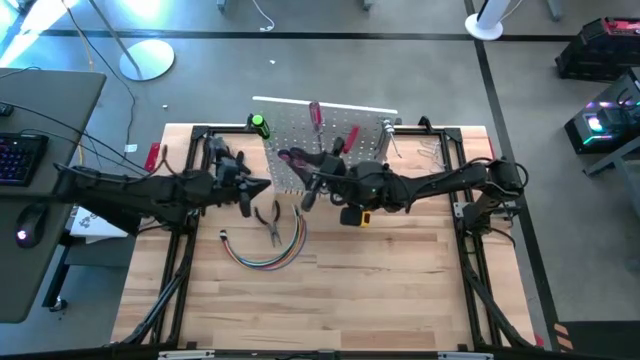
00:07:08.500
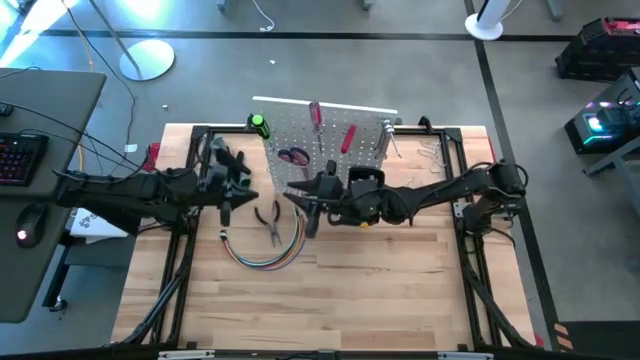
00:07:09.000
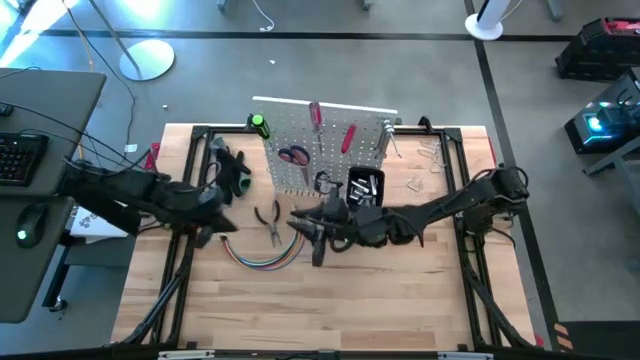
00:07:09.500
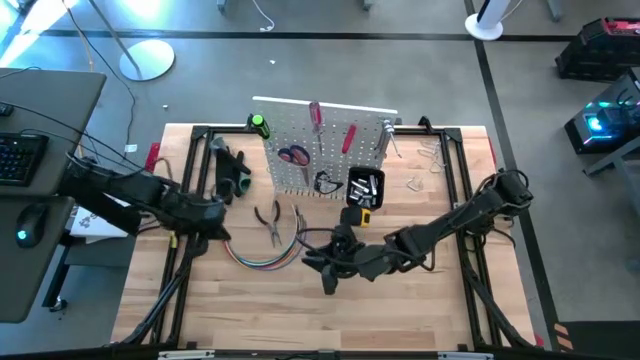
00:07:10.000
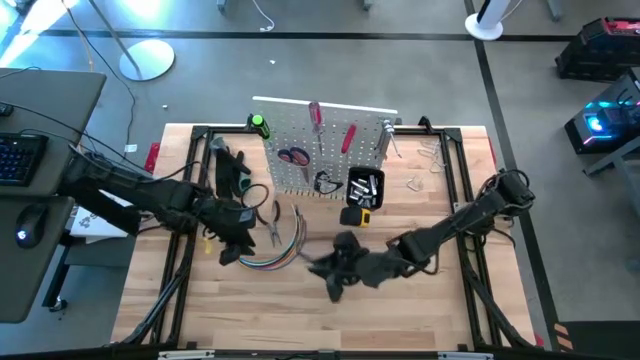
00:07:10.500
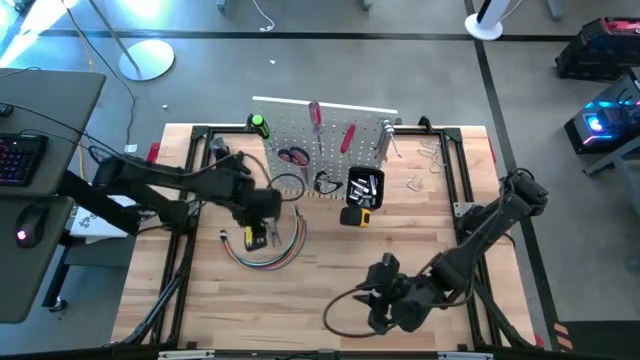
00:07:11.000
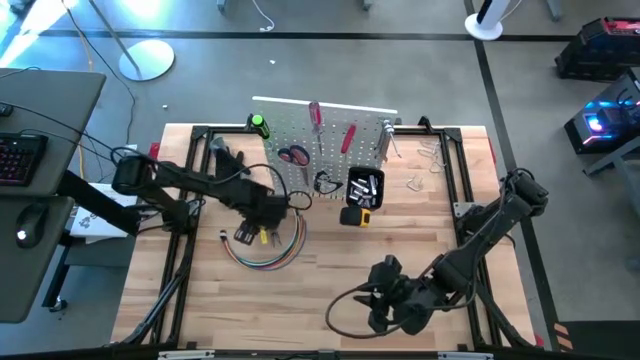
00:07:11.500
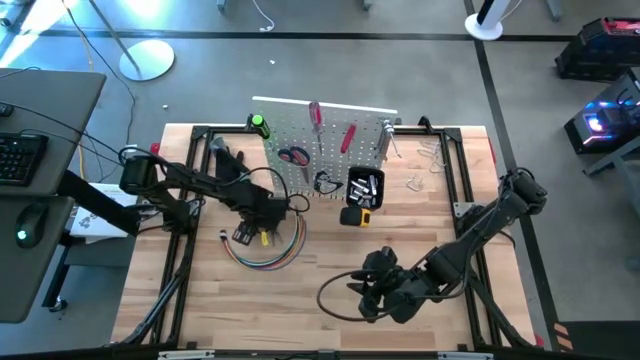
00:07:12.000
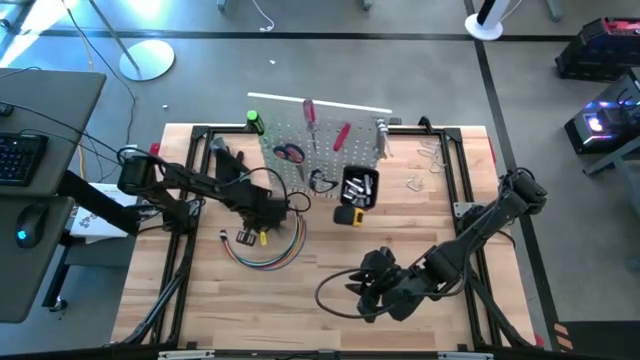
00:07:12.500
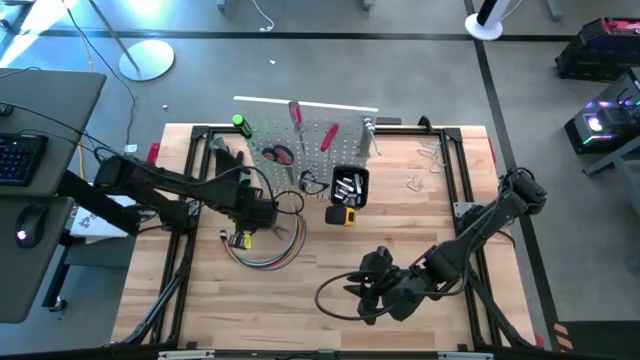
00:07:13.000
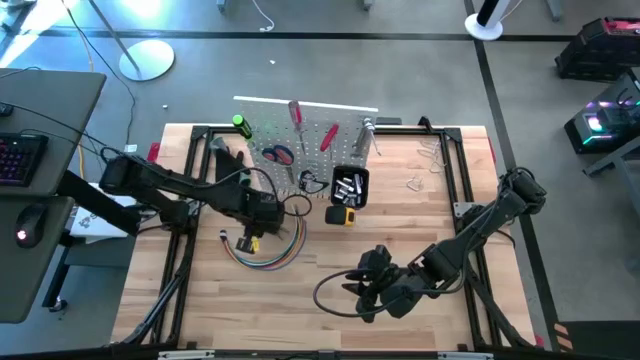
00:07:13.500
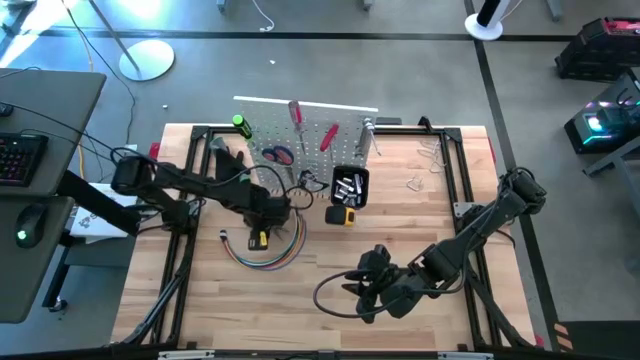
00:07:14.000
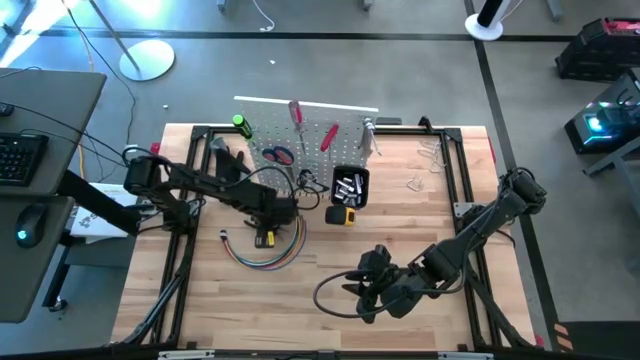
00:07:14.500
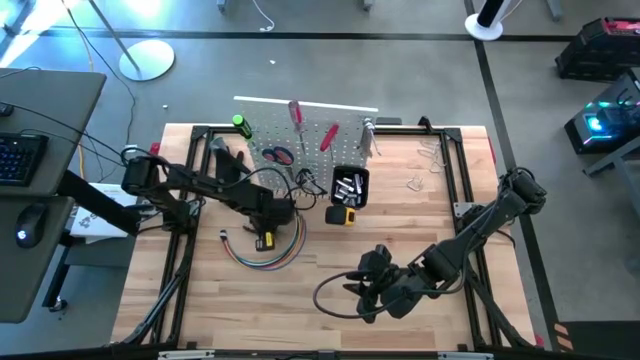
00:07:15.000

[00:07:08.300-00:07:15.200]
Task: Hang tools onto peg board
Hang the plier on the peg board

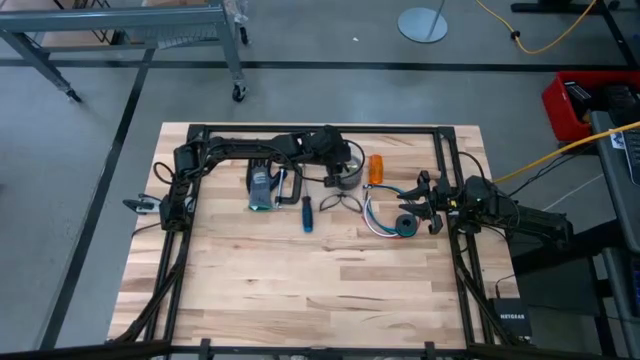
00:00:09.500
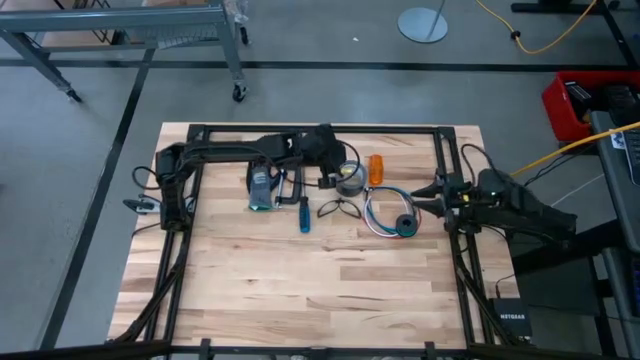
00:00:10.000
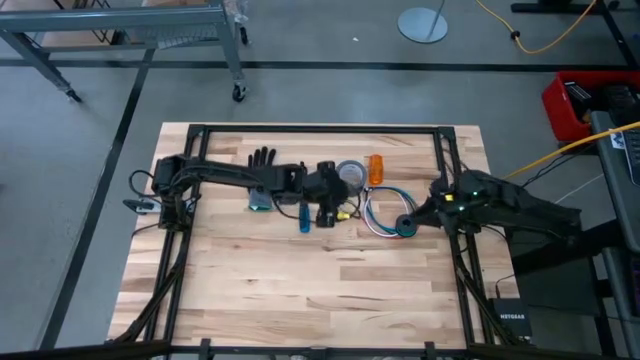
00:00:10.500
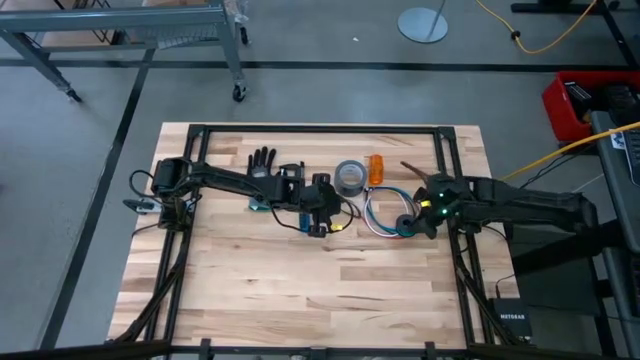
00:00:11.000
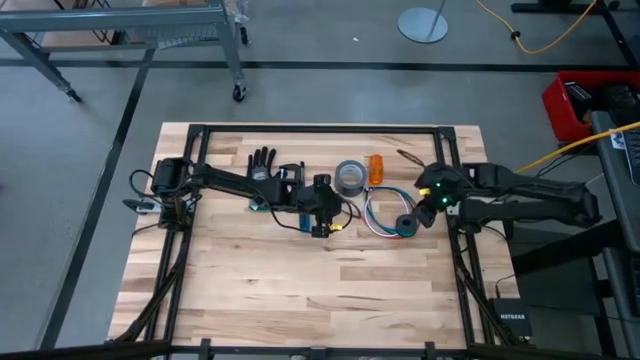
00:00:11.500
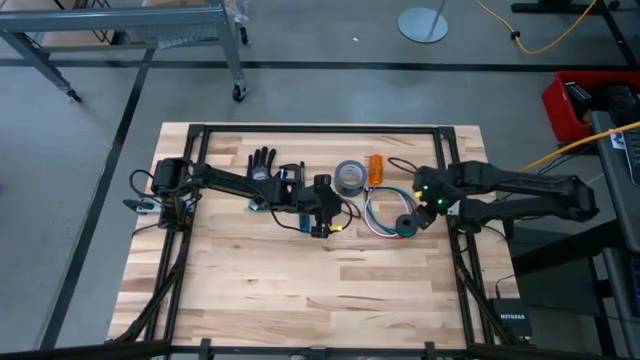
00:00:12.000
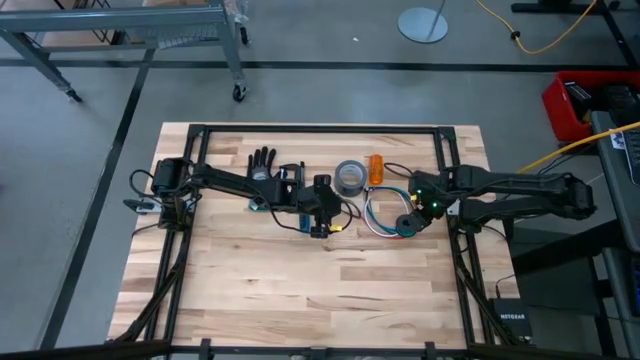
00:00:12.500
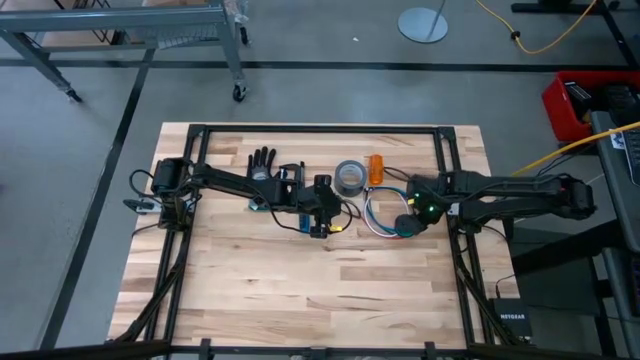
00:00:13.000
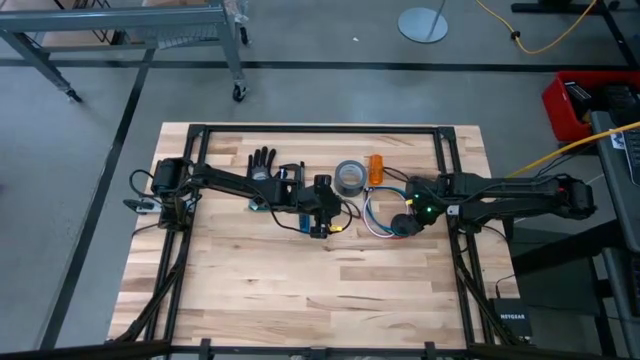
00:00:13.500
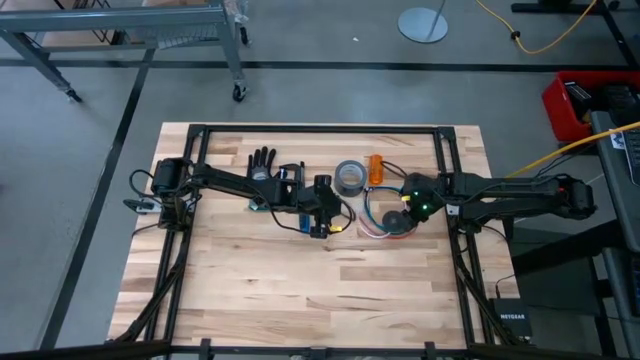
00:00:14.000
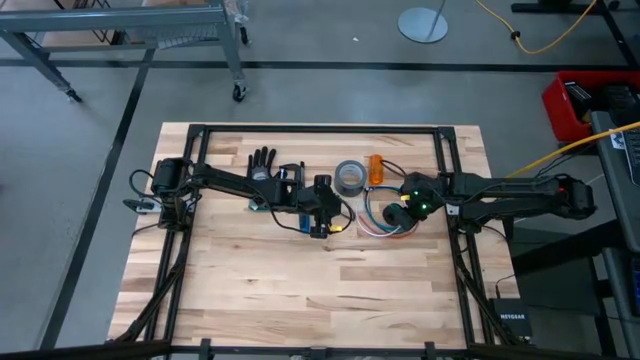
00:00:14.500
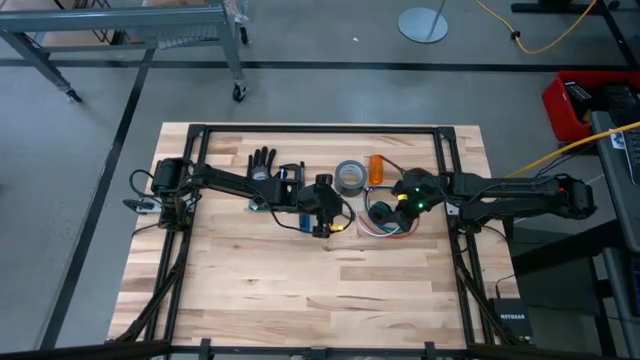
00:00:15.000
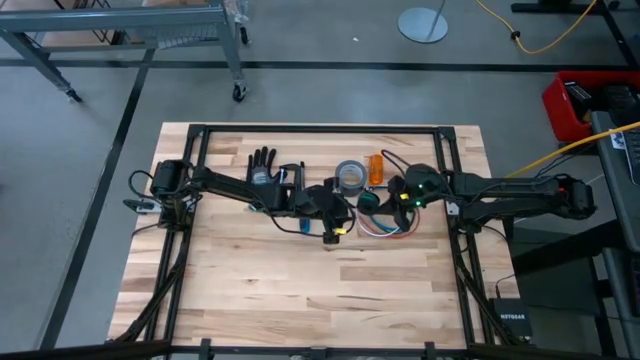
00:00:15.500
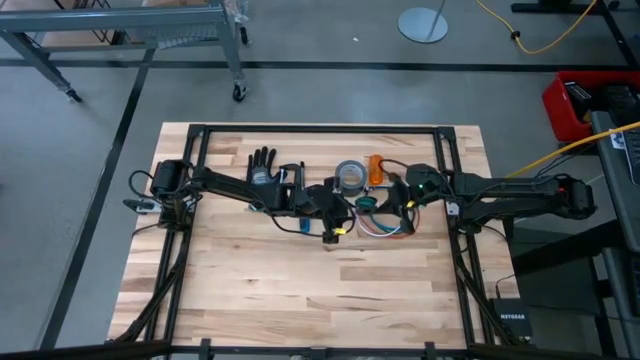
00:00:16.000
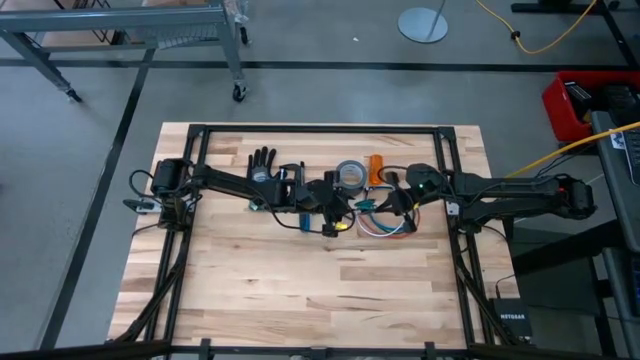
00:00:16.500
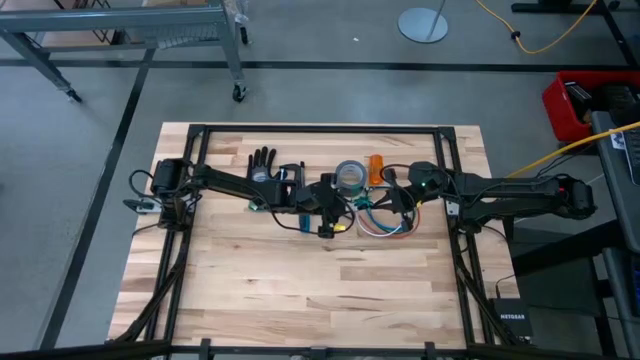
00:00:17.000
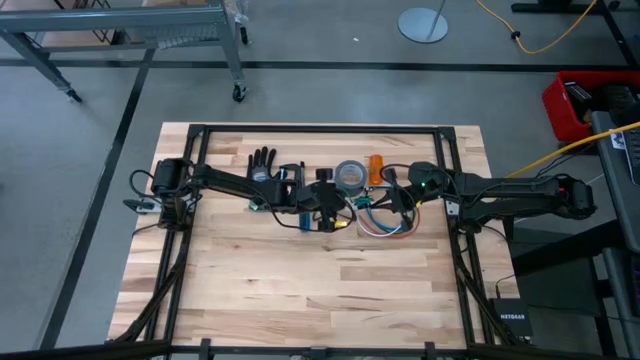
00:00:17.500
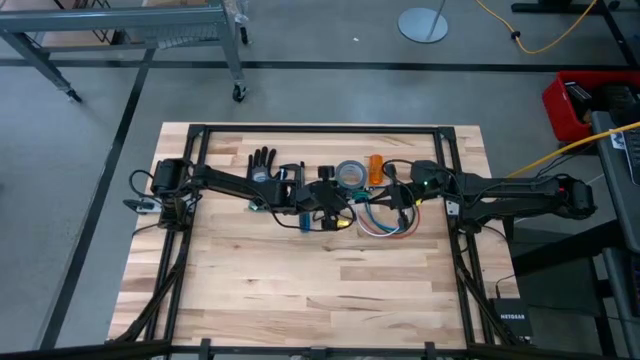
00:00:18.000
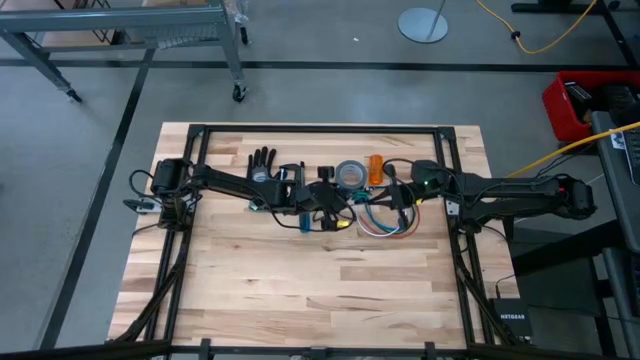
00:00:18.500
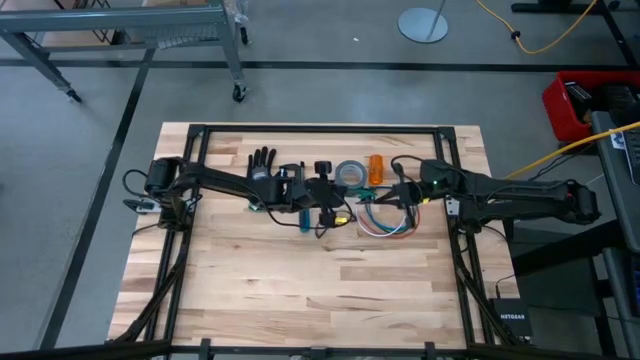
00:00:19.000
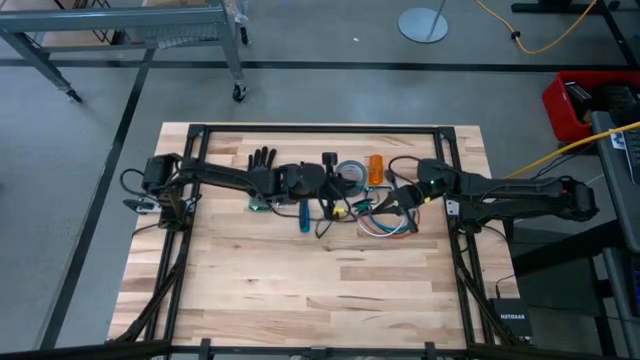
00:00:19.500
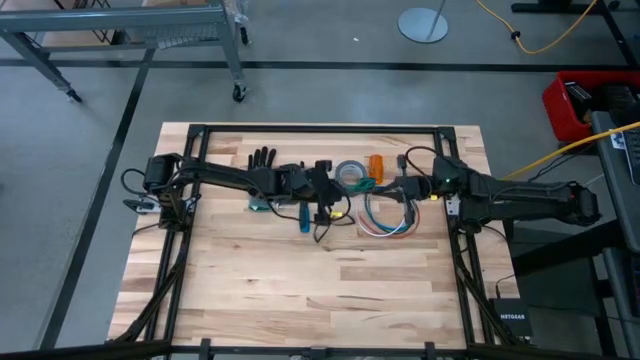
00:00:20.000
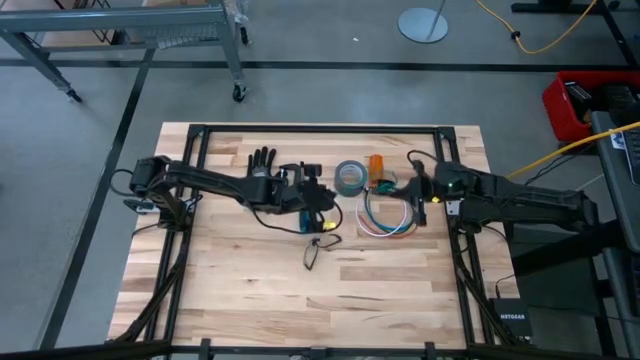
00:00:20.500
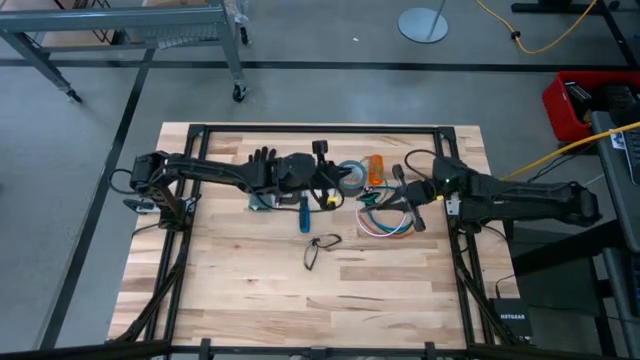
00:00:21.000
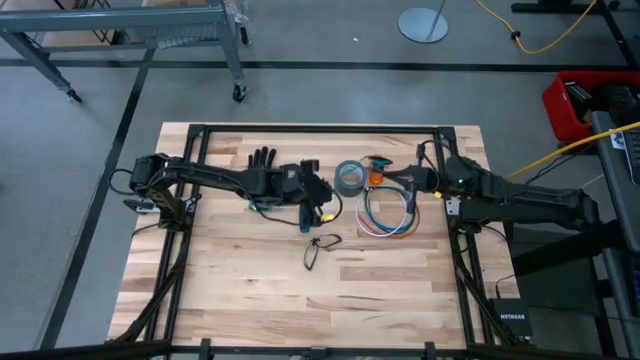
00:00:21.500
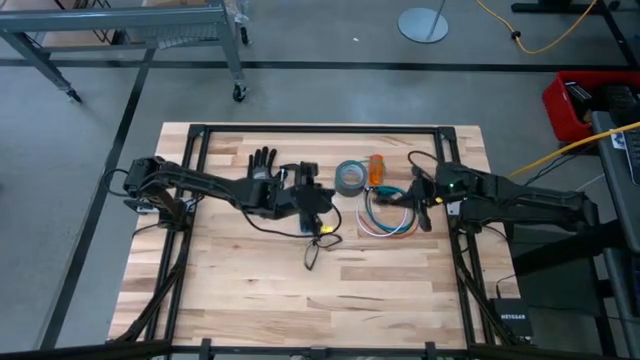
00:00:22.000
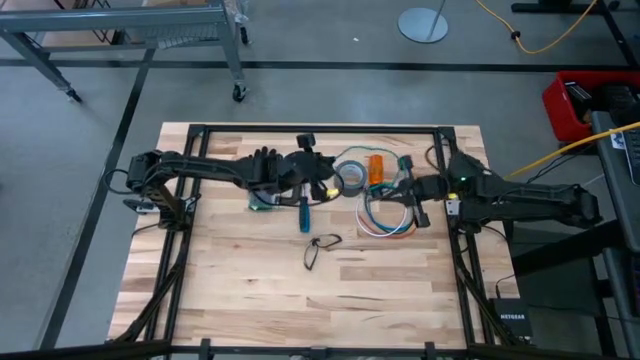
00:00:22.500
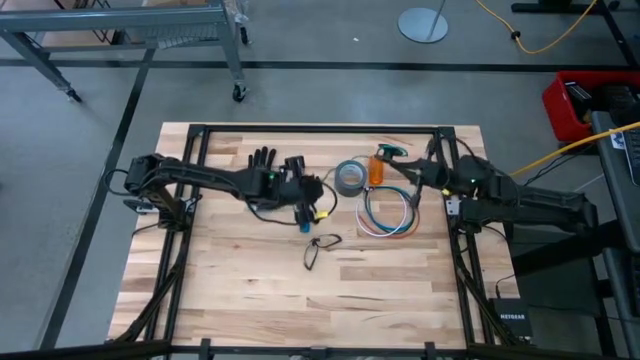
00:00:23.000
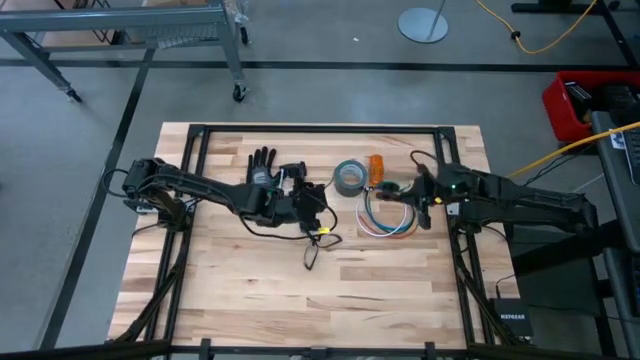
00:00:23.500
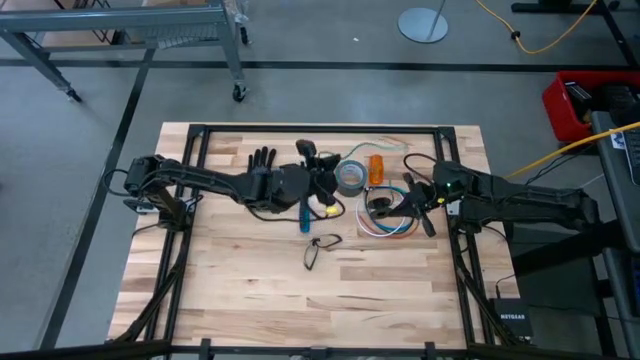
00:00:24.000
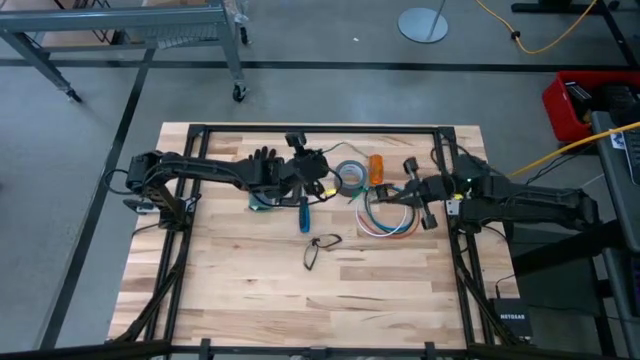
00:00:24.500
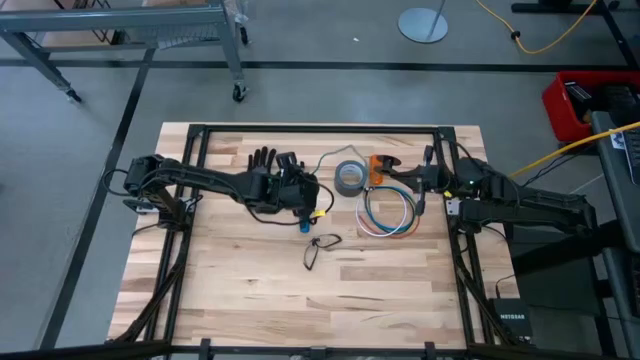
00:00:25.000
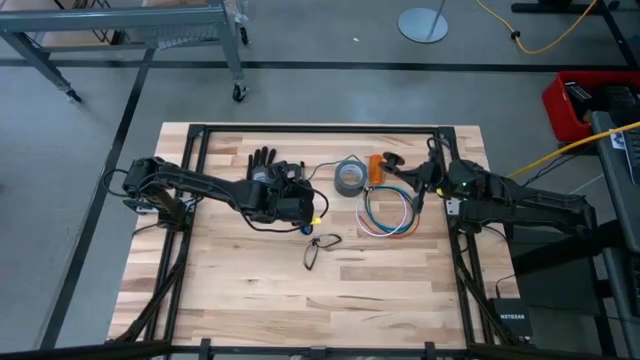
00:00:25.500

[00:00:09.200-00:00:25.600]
Task: Coil cords
Uncoil the green wire from the spool
